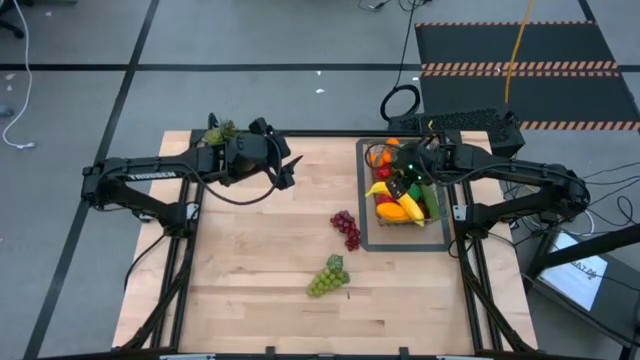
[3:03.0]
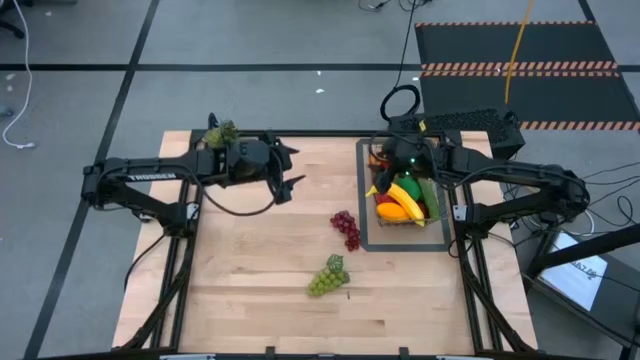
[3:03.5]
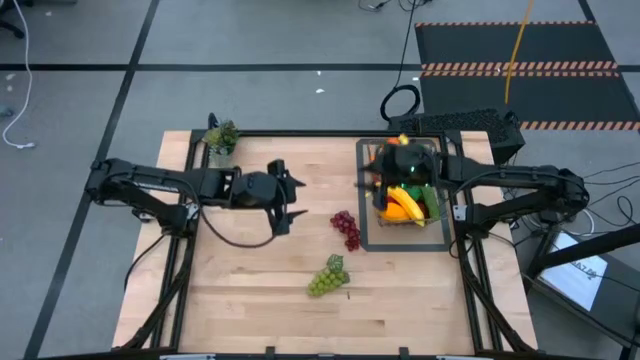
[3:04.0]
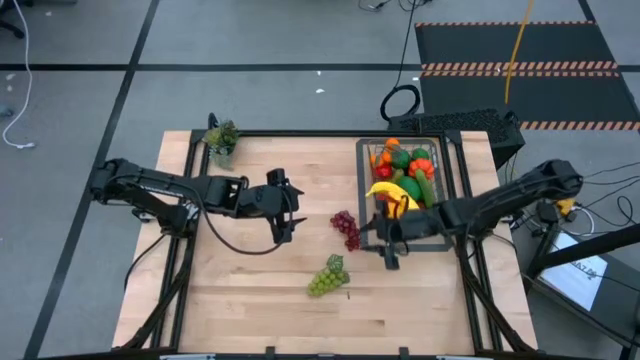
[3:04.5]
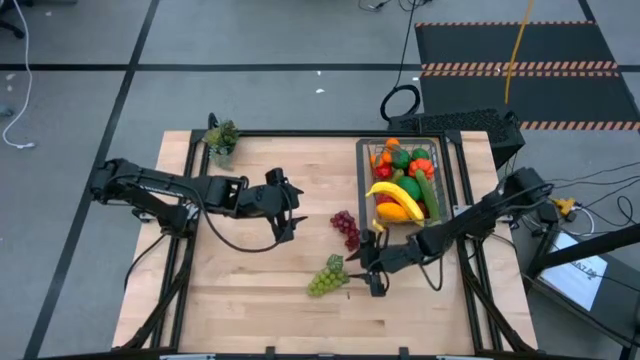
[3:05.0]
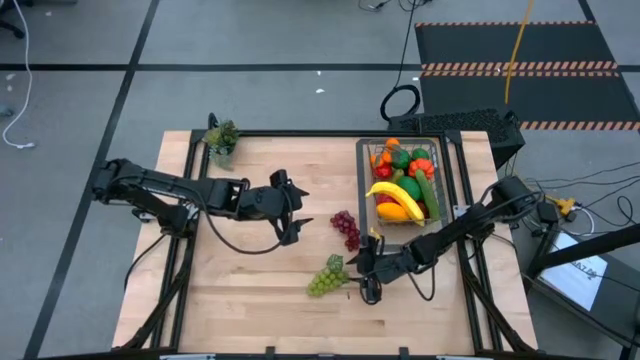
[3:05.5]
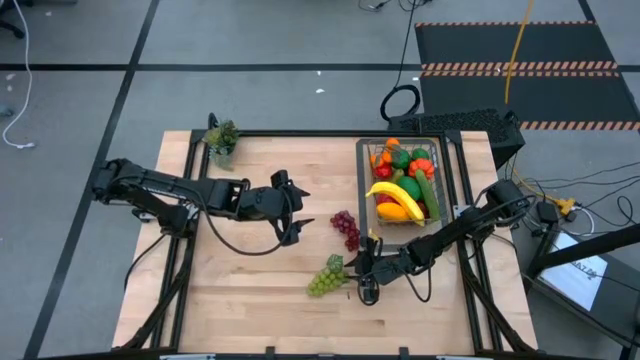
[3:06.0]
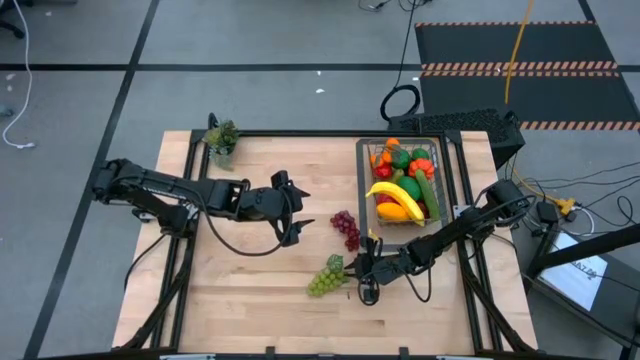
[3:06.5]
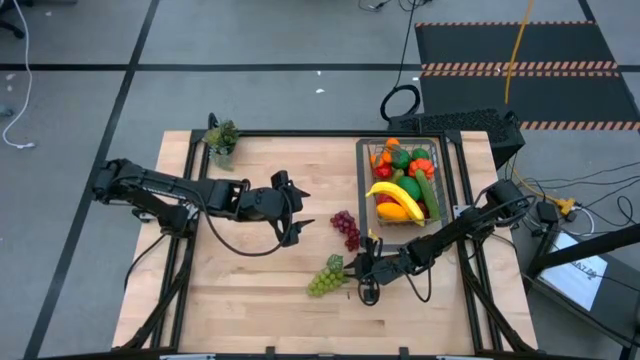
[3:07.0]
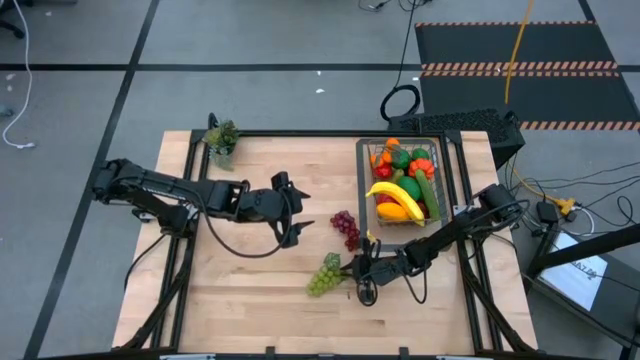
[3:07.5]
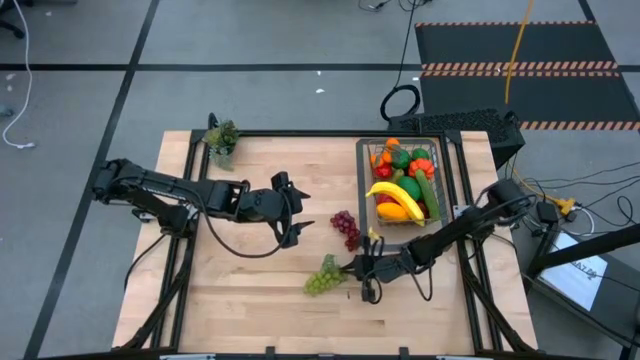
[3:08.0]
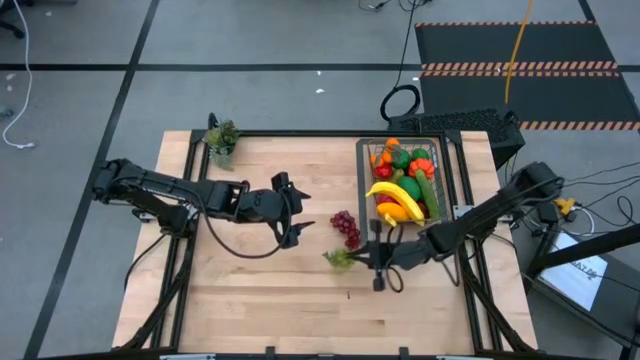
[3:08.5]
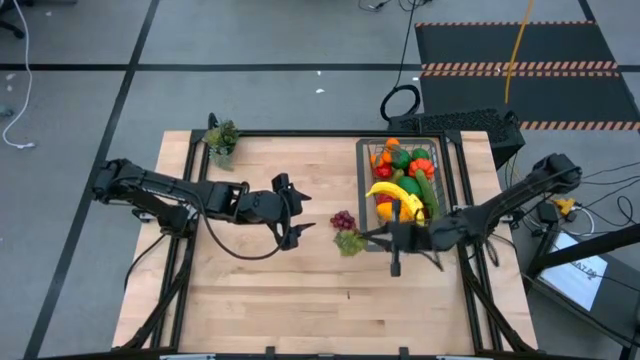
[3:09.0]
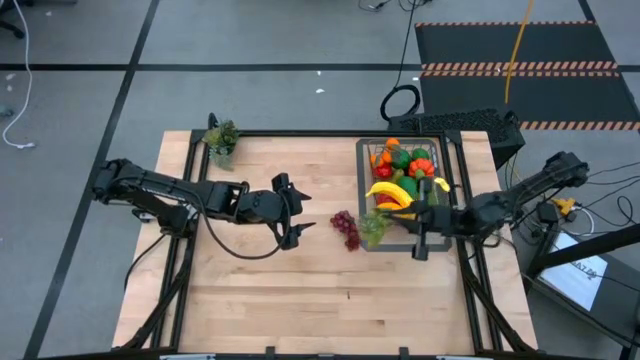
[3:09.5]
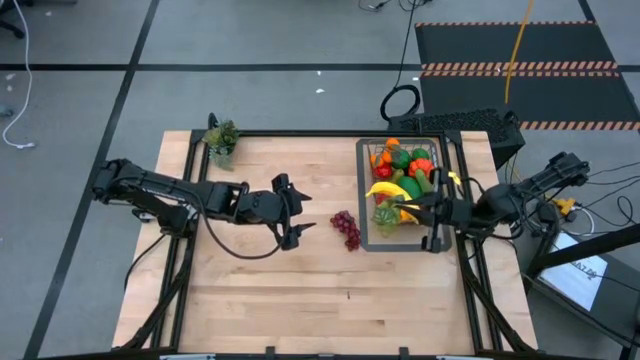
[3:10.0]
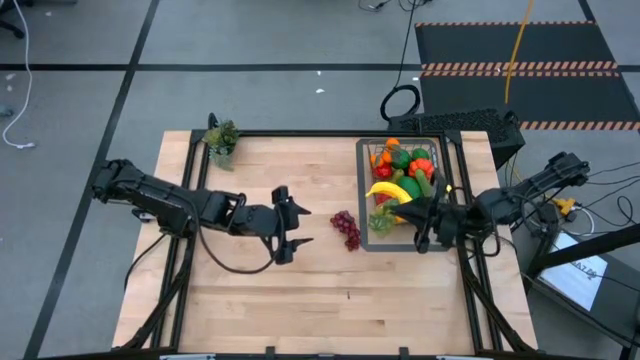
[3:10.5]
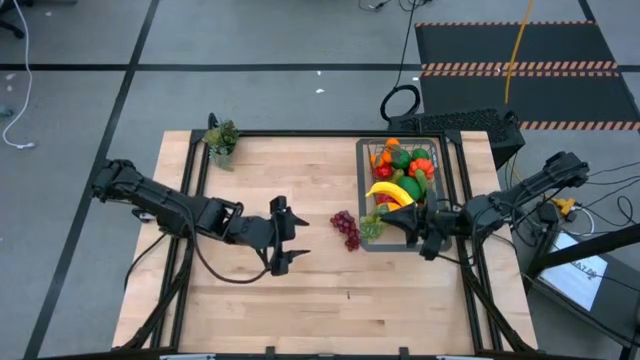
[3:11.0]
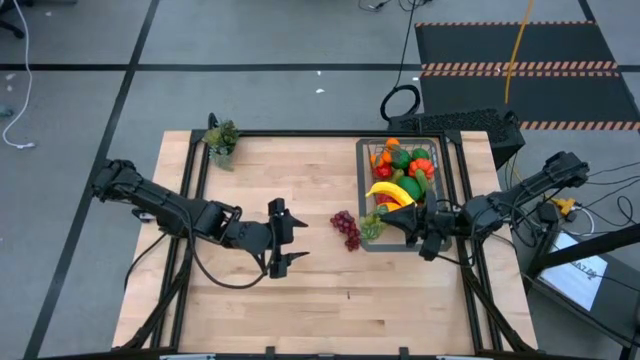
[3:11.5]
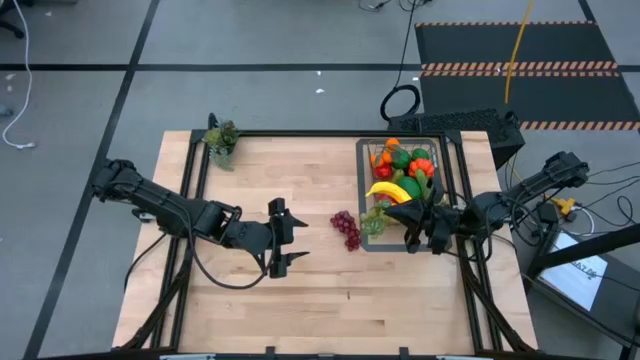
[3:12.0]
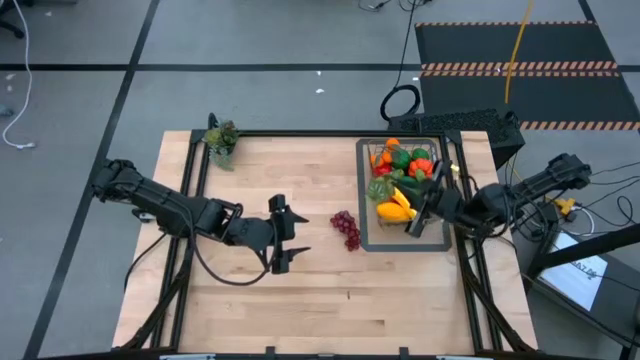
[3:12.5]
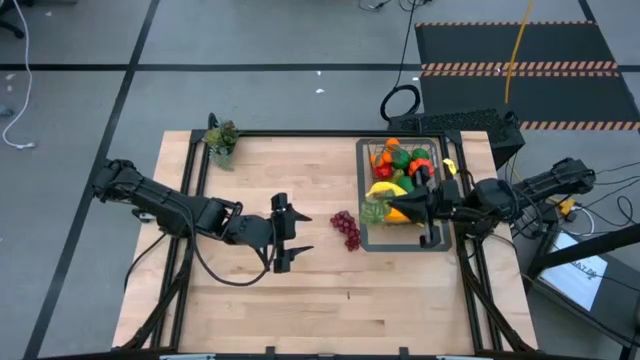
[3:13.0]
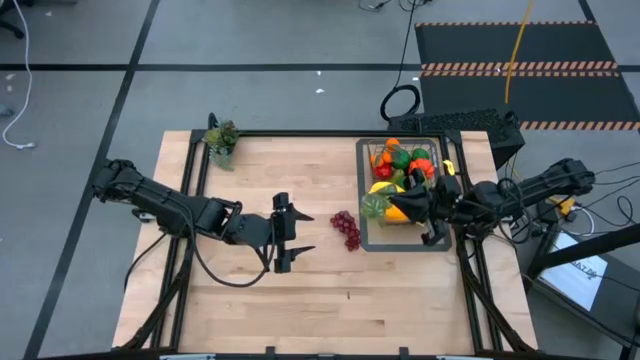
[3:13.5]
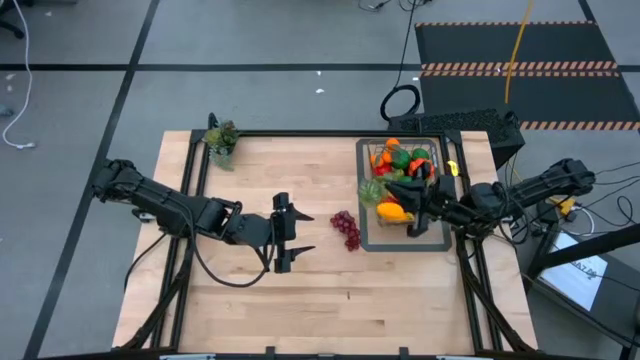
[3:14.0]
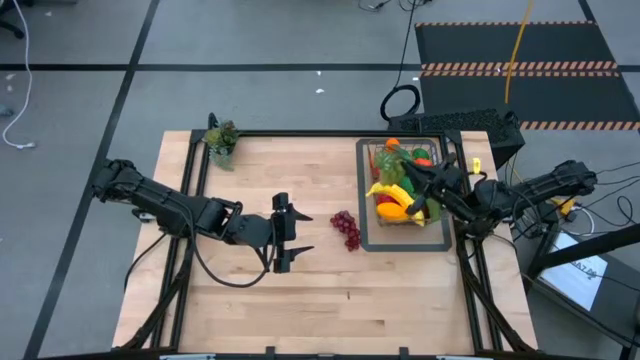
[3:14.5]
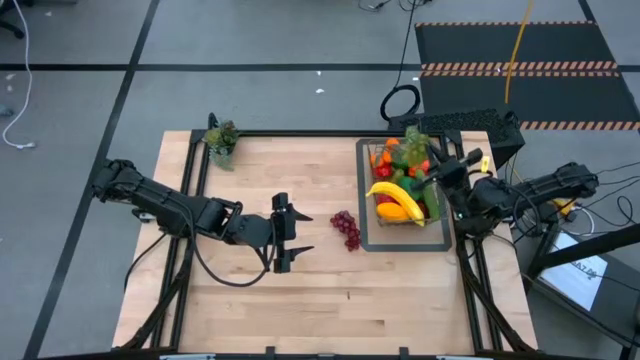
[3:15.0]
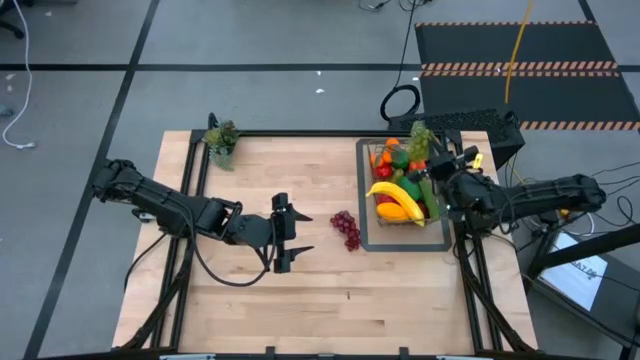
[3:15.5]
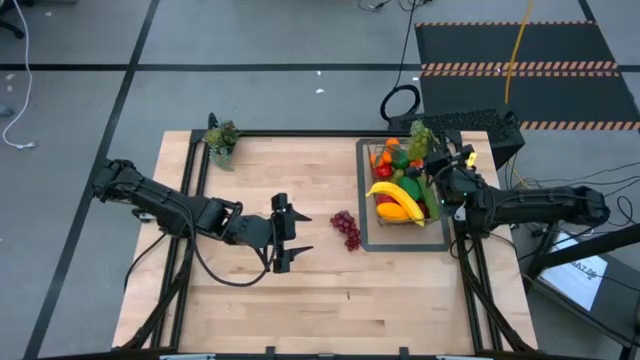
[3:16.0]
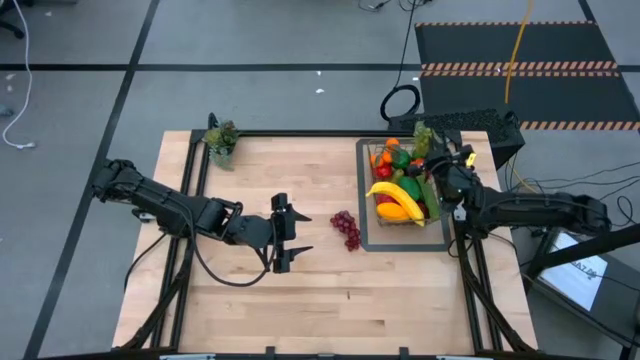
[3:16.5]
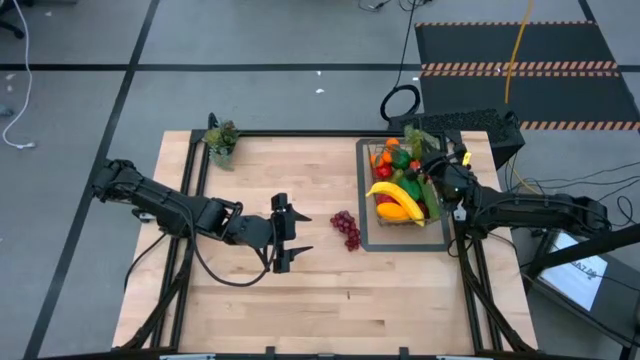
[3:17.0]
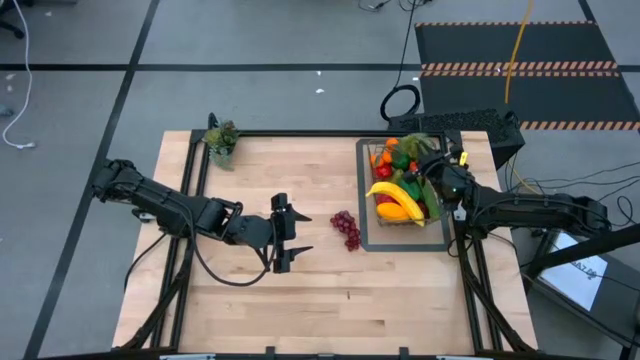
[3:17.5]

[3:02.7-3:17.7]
Task: Build produce basket
Put the bottom grapes into the gold wire basket

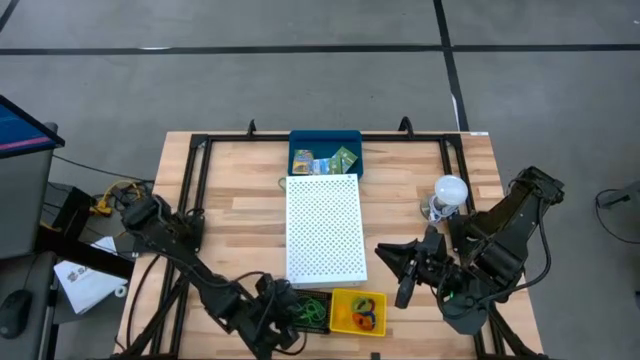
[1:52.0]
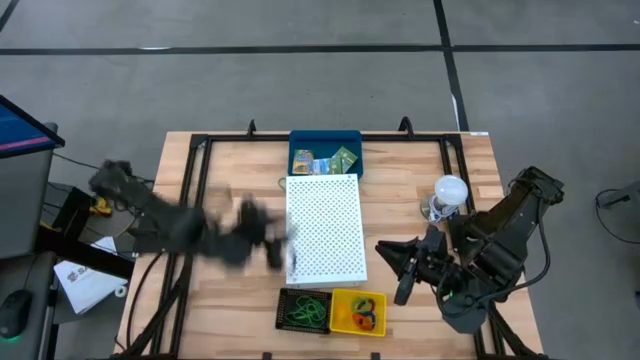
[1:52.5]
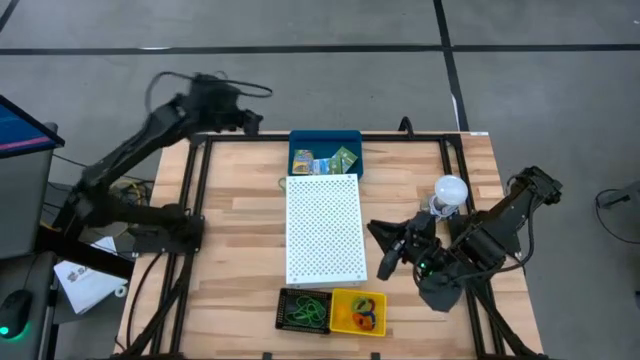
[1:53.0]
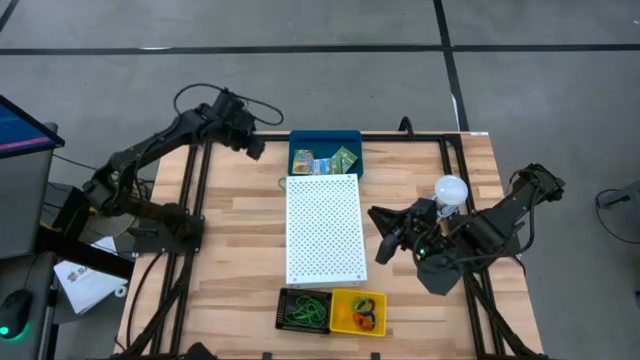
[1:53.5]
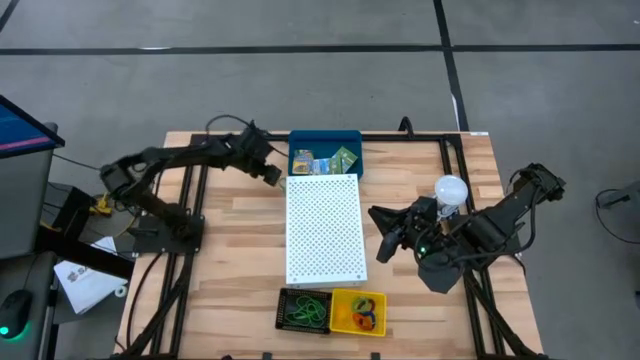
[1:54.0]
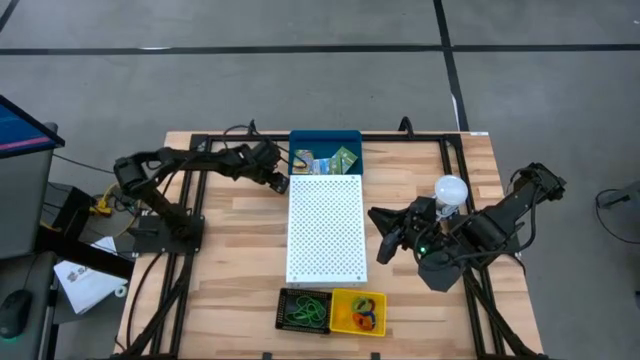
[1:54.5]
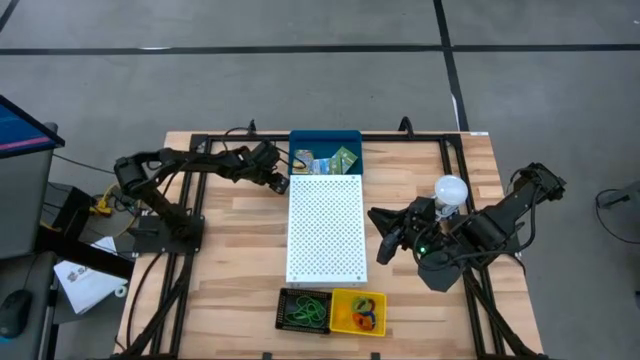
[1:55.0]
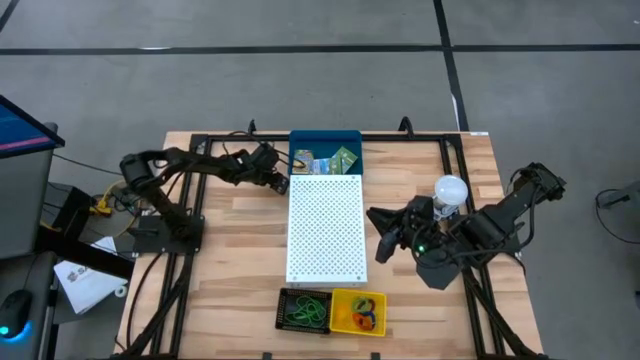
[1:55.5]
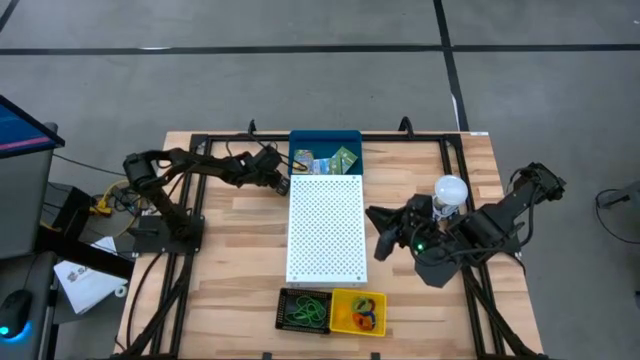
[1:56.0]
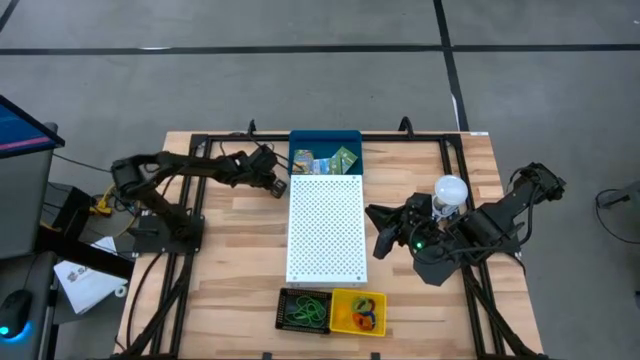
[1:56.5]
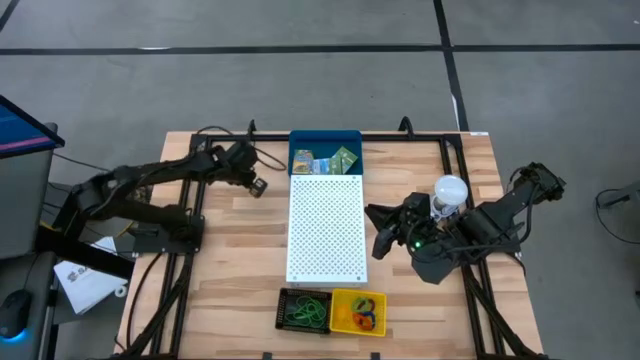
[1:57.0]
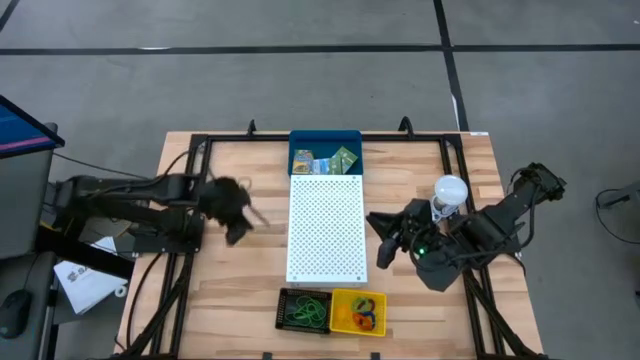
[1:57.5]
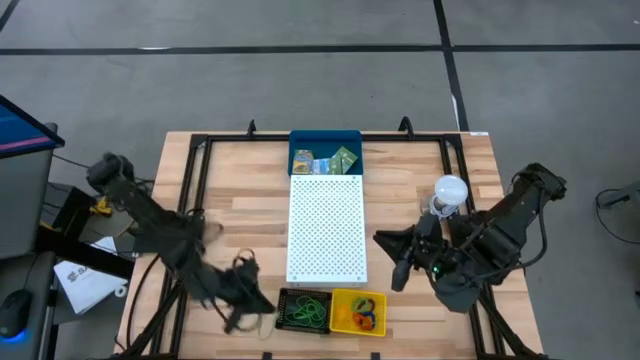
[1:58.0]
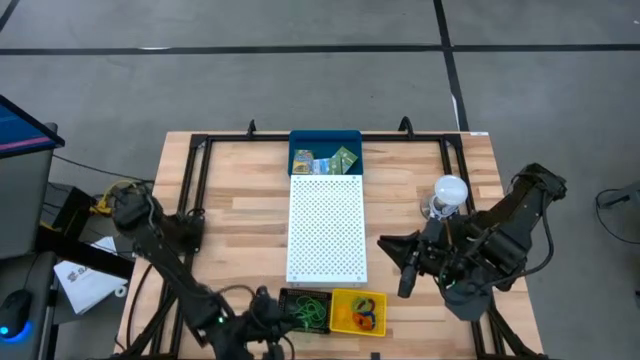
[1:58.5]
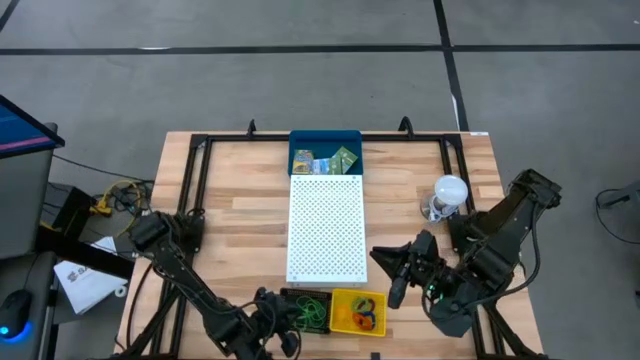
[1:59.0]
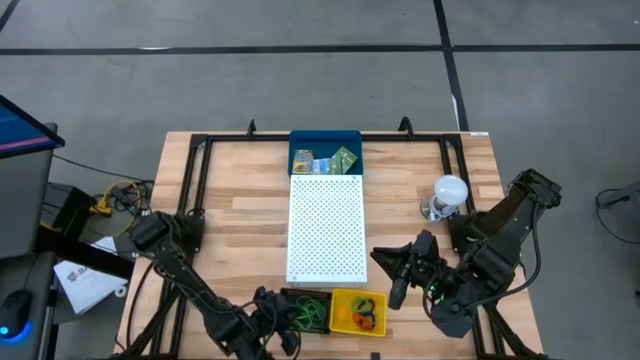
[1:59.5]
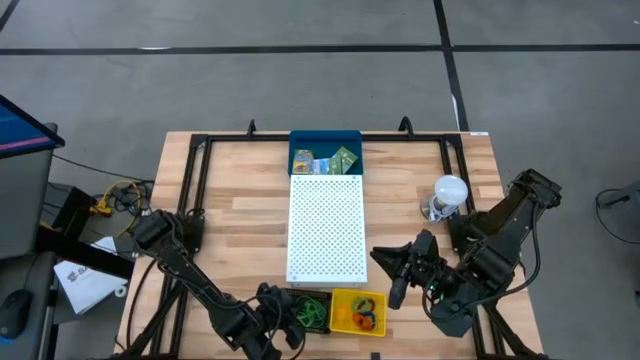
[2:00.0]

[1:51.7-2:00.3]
Task: Pick & Place Office Desk Supplies
Put the green rubber band into the black bin
